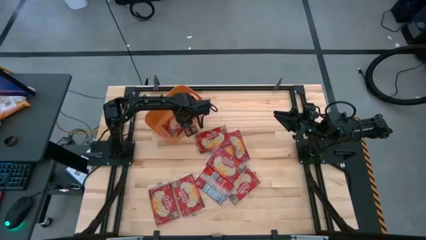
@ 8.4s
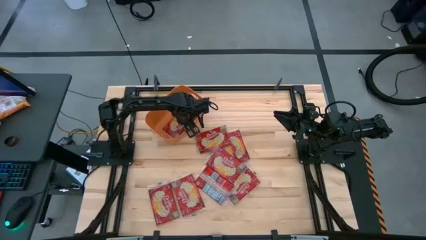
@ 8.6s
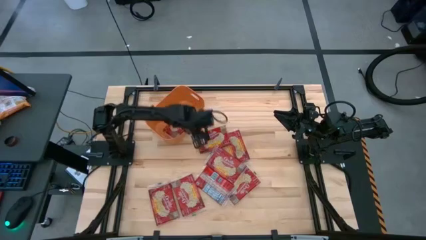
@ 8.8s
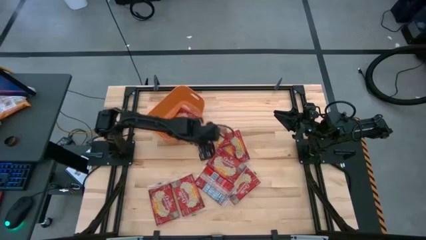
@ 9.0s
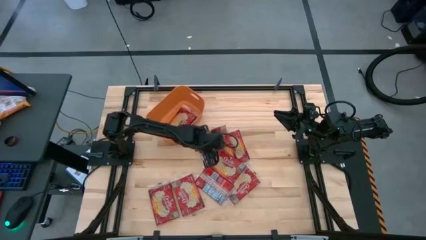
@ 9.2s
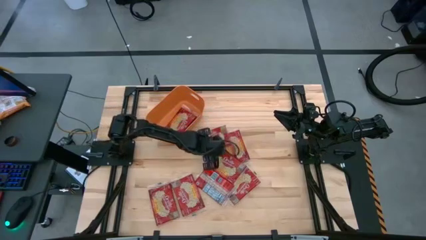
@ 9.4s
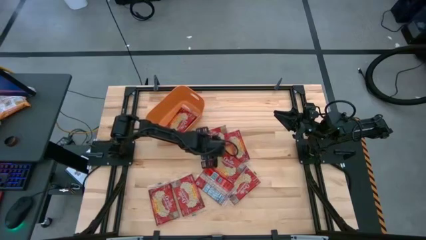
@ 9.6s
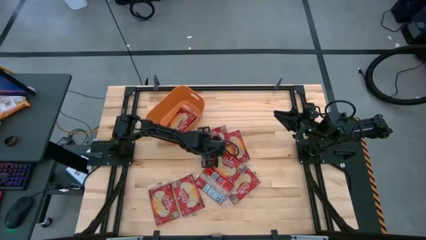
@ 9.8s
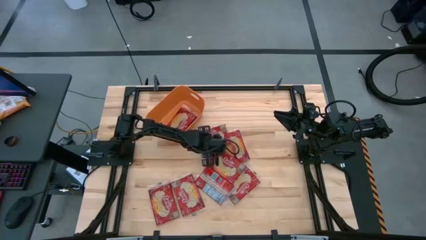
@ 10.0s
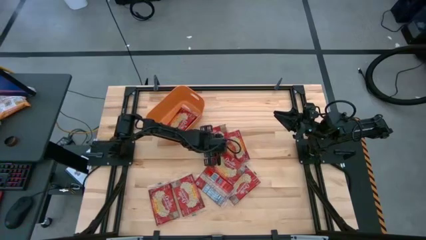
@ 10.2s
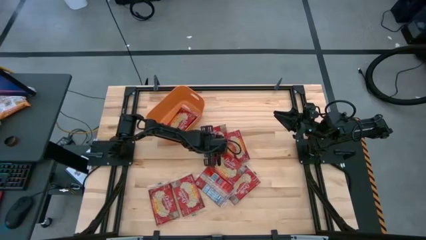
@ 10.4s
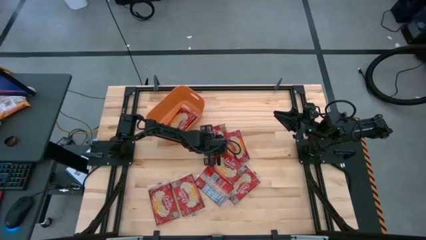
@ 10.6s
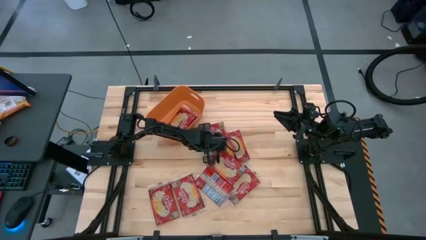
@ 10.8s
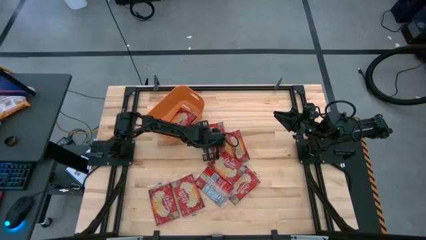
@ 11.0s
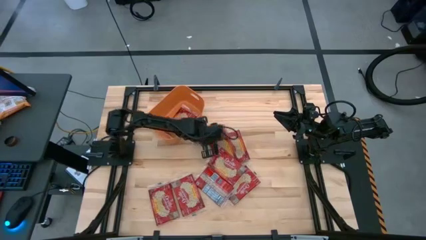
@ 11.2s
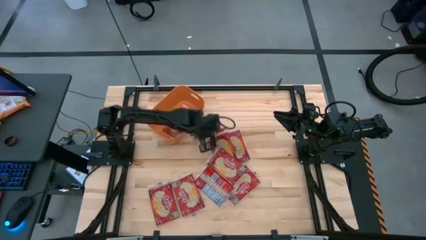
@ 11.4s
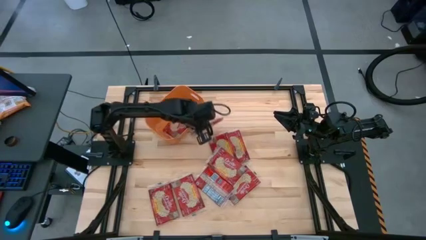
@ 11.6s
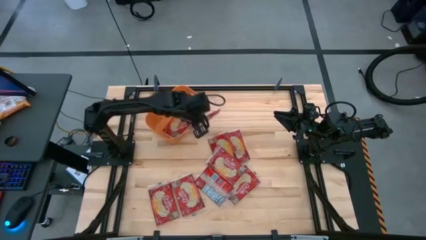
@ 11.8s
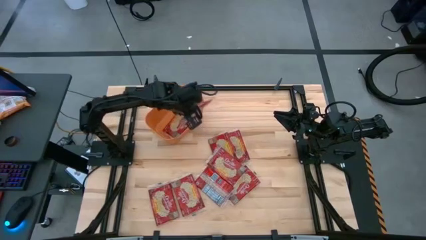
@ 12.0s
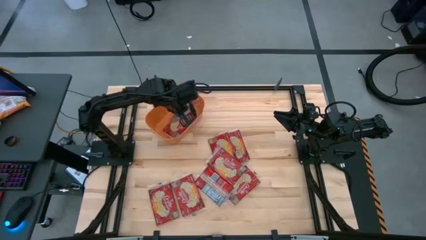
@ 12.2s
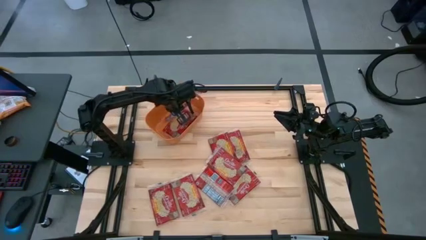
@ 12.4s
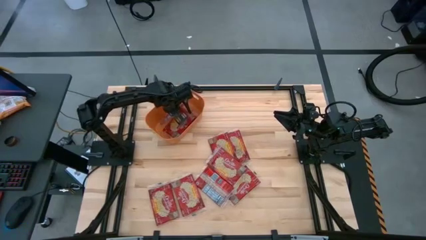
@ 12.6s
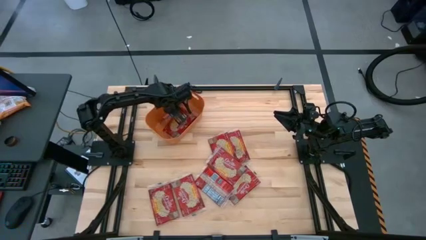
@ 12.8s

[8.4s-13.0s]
Task: Sort popcorn bags into baskets
Put the red popcorn bag into the orange bin

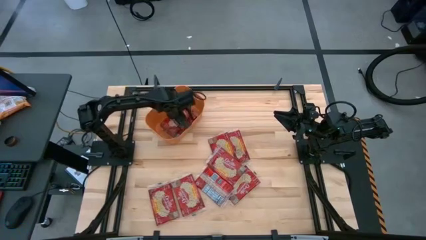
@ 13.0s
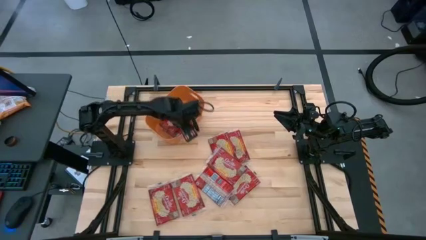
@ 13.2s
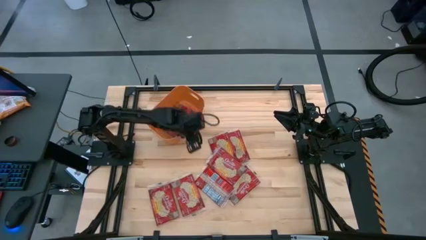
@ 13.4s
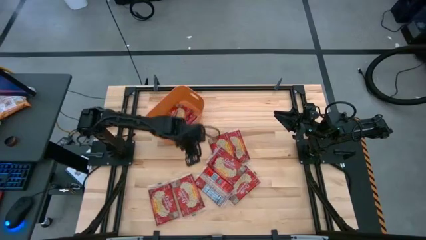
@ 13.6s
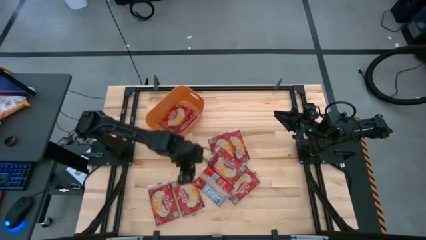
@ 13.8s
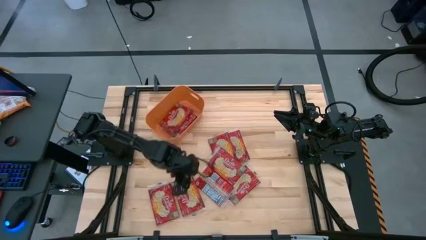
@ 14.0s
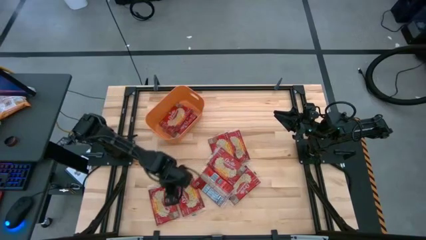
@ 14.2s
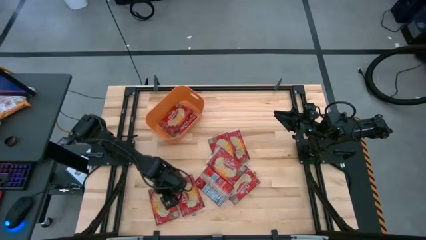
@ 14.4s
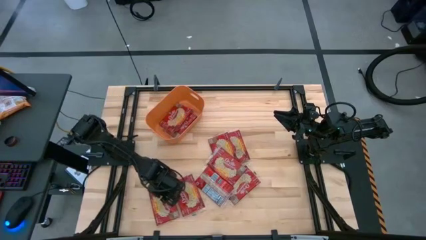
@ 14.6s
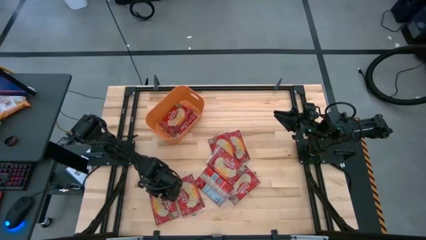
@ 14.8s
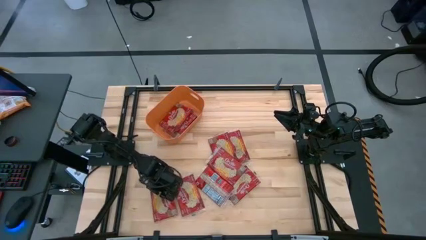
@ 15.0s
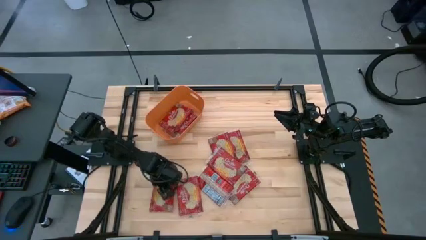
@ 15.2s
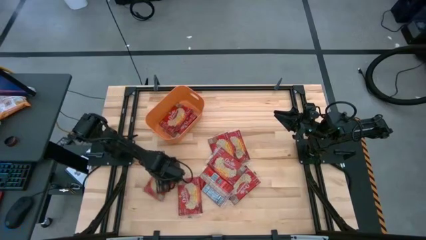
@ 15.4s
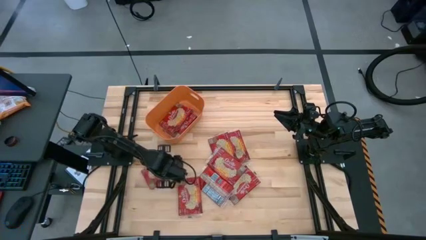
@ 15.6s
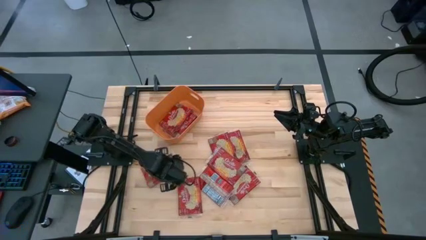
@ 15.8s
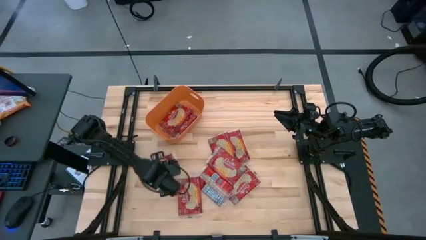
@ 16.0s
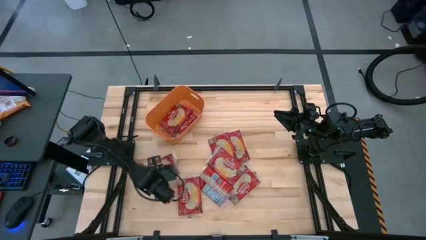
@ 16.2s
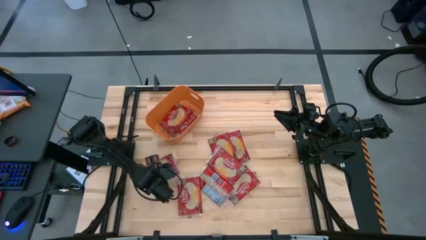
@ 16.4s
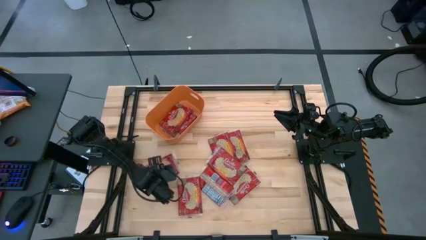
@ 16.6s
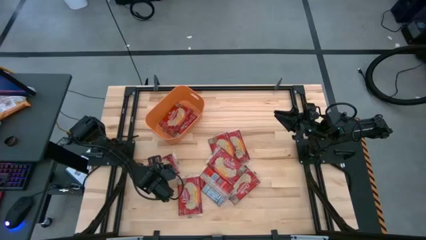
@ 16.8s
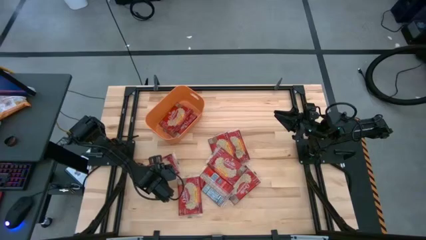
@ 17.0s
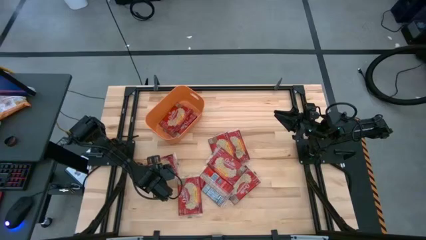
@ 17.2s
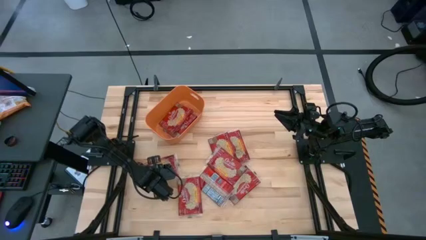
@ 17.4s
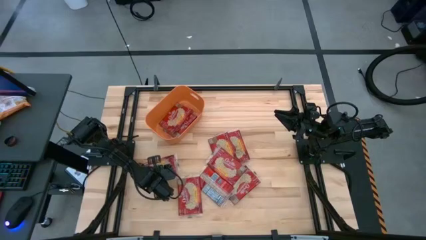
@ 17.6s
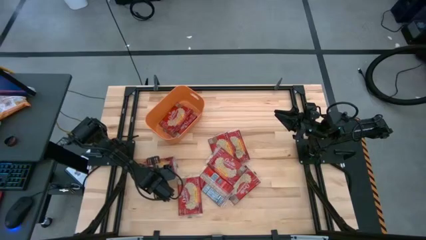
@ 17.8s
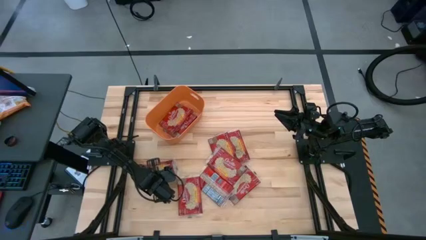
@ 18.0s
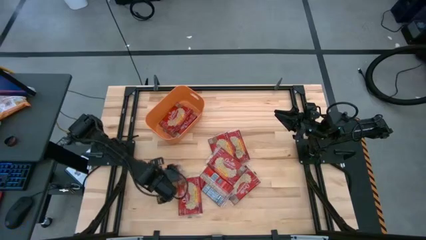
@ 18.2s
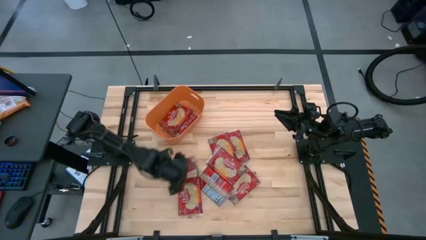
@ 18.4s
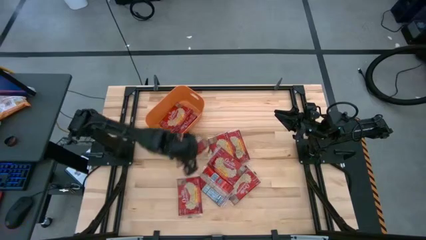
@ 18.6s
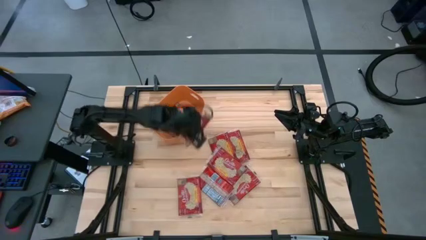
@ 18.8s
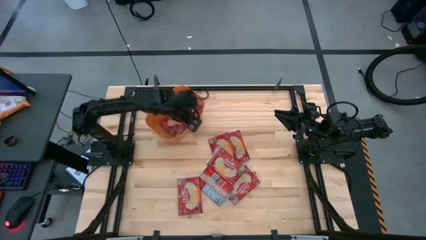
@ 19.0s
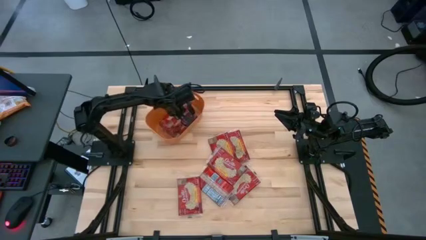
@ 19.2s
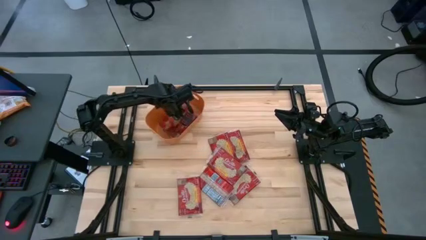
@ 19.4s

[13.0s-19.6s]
Put the red popcorn bag into the orange bin

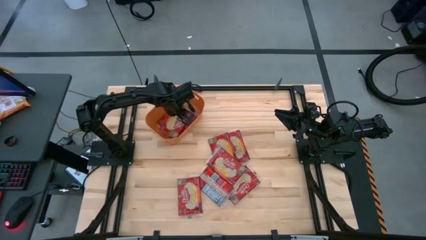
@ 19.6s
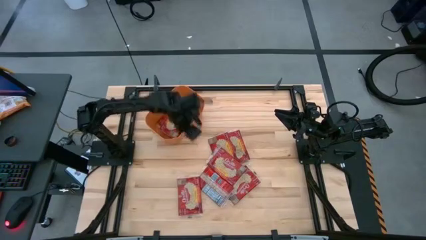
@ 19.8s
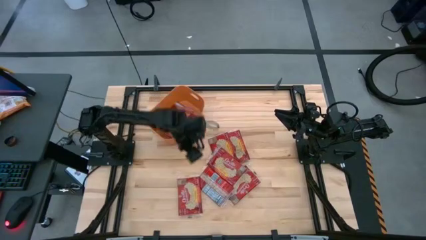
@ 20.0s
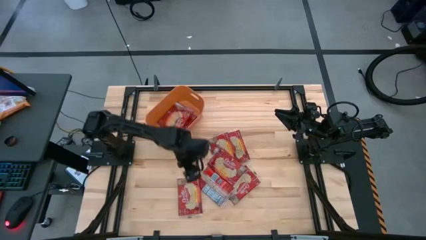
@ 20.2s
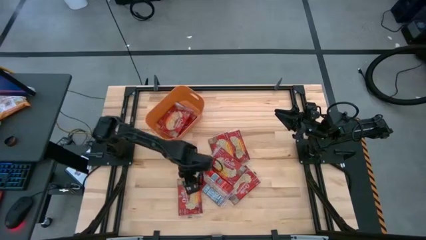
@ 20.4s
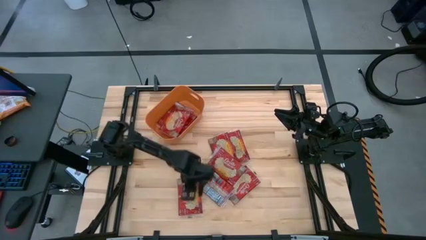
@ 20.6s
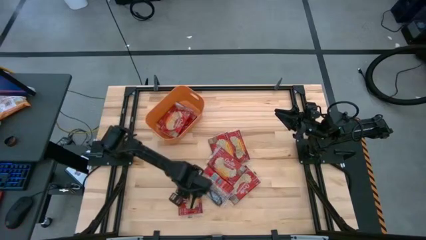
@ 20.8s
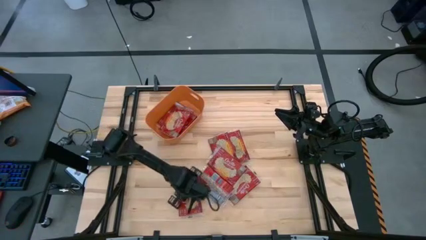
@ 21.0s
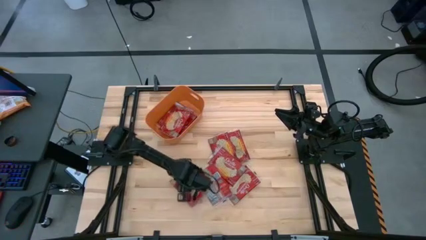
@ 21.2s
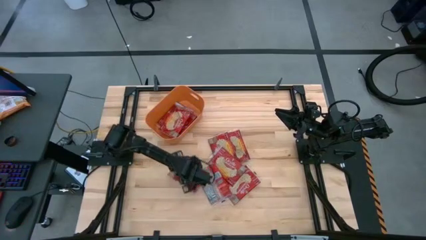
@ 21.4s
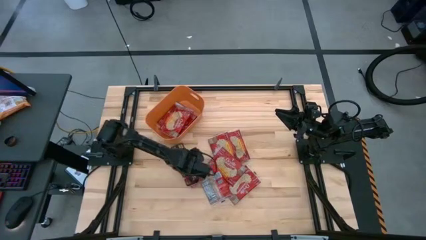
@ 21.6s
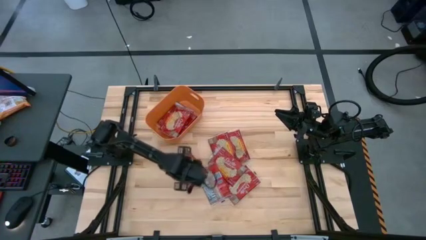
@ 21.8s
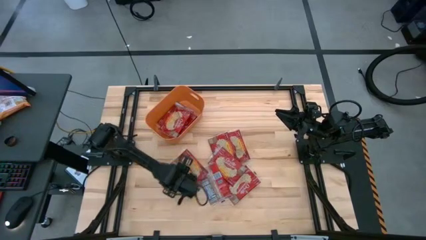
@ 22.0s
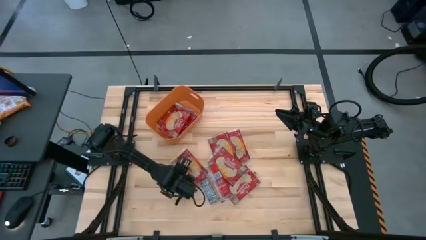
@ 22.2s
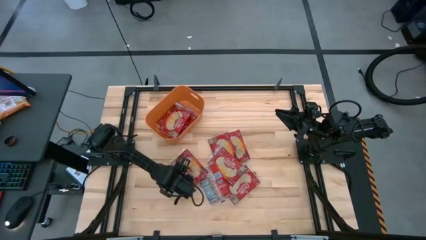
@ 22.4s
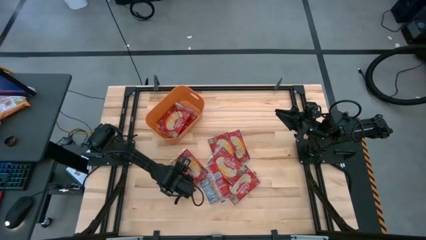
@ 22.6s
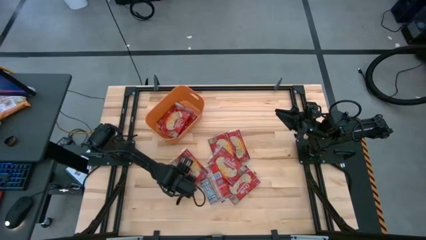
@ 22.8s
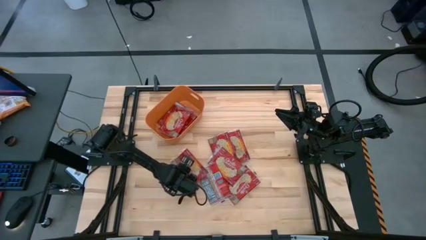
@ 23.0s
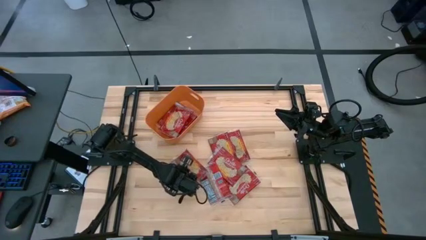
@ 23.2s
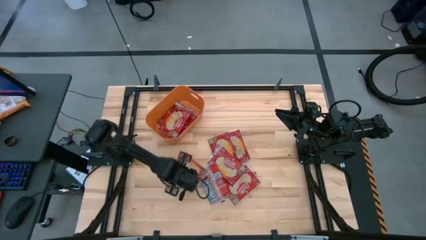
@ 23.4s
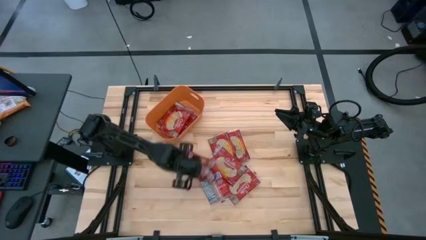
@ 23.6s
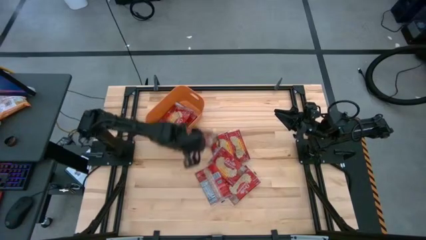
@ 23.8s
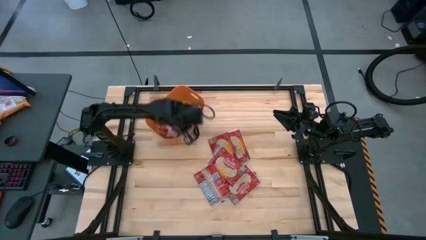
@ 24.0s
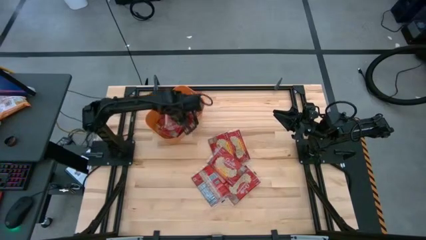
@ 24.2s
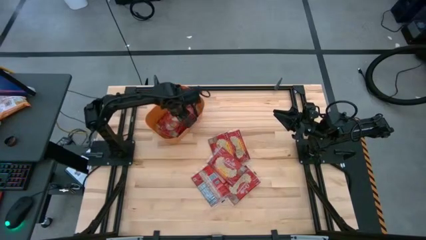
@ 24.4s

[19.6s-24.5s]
Put the red popcorn bag into the orange bin

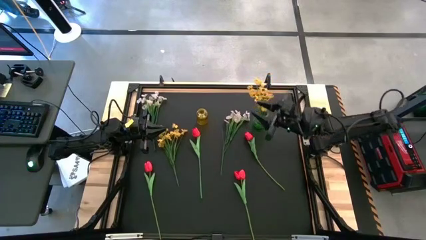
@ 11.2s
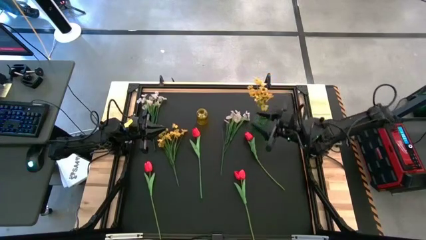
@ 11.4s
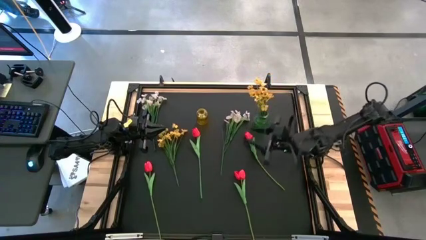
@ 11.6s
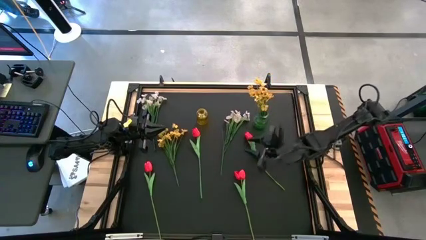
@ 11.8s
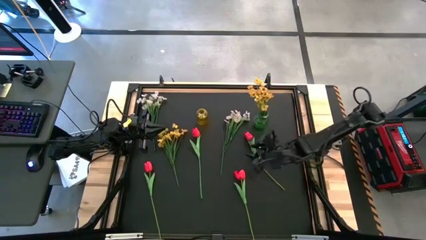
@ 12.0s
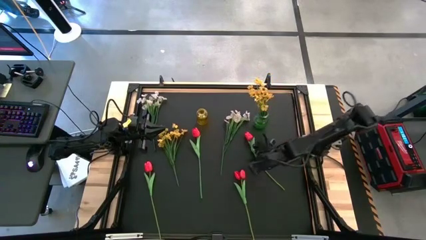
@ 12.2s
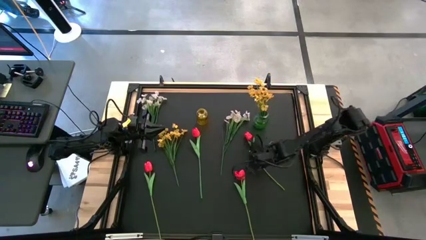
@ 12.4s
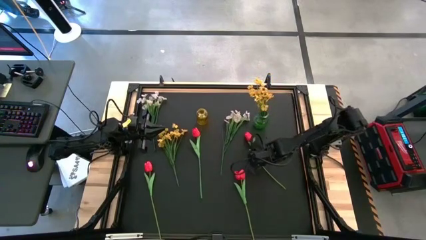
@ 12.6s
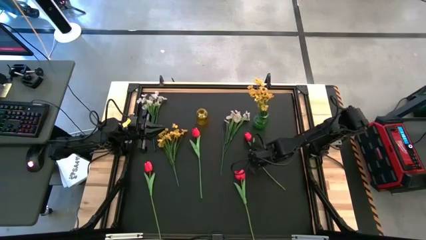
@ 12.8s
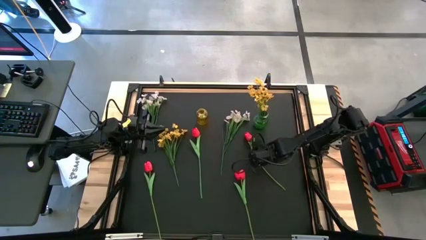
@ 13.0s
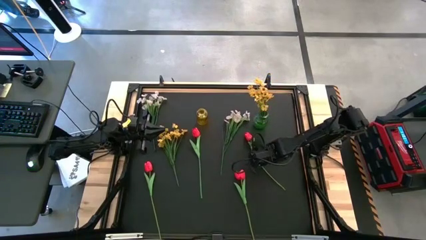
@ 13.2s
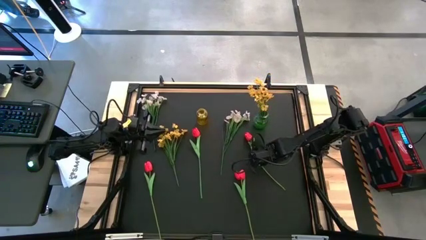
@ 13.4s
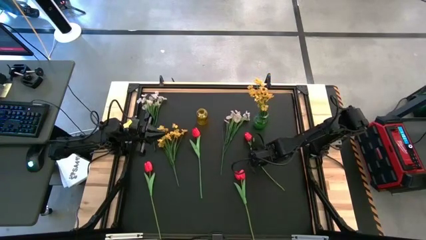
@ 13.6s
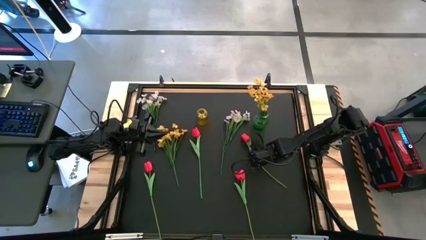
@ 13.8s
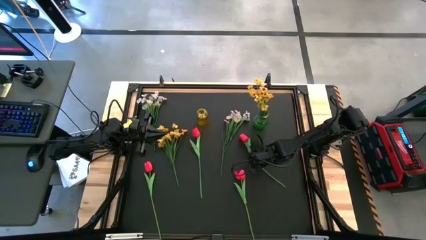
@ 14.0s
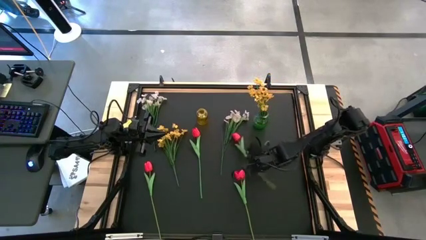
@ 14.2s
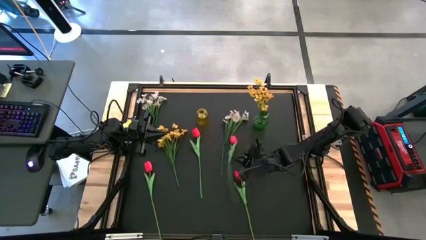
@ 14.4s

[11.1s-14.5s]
Task: Sort flowers into vase by color
Put the red tulip into the yellow vase
